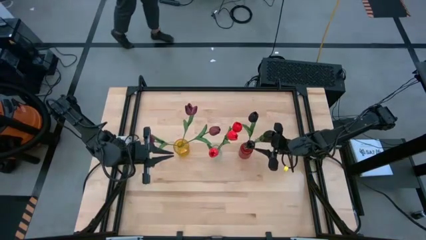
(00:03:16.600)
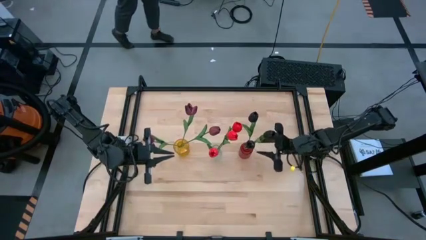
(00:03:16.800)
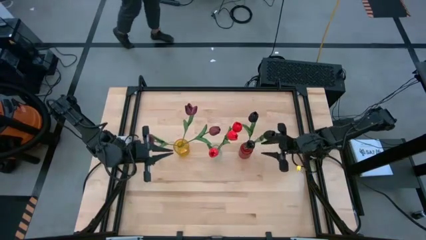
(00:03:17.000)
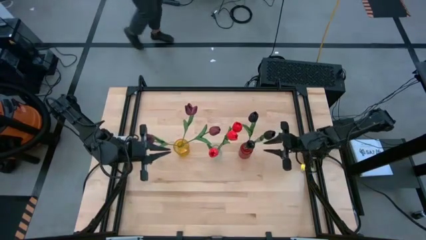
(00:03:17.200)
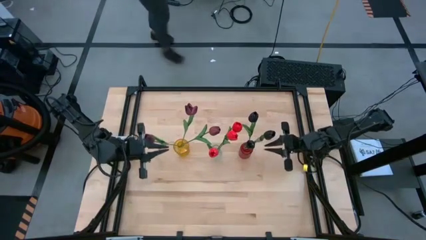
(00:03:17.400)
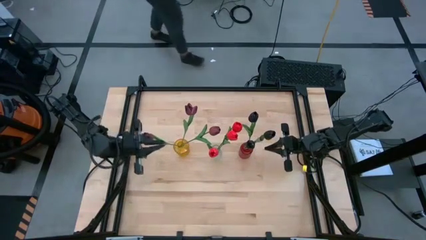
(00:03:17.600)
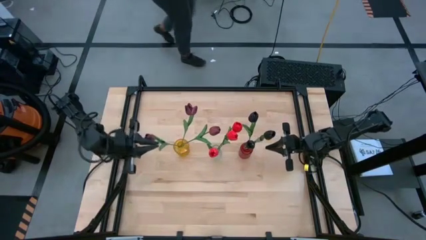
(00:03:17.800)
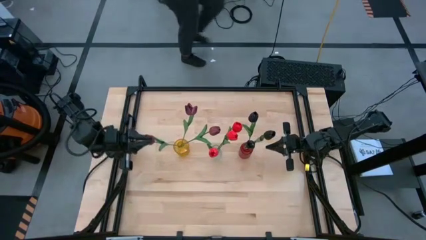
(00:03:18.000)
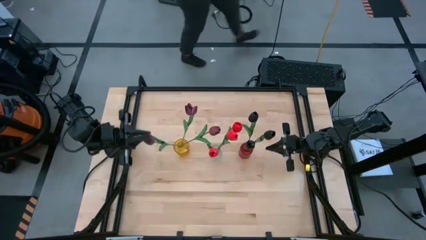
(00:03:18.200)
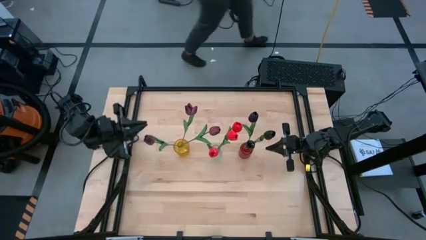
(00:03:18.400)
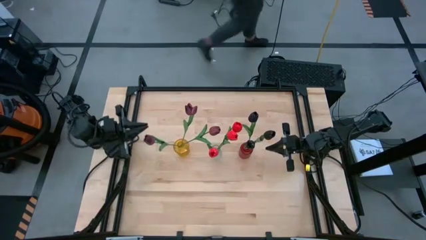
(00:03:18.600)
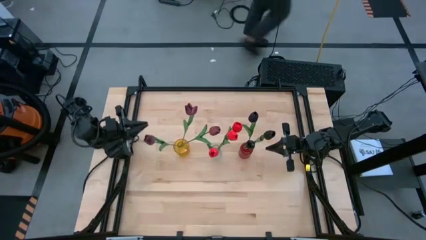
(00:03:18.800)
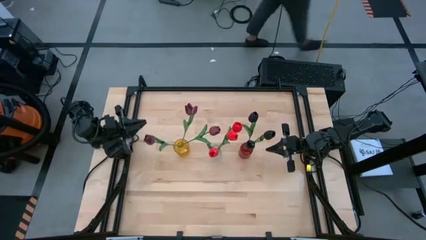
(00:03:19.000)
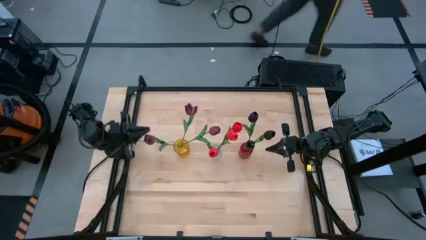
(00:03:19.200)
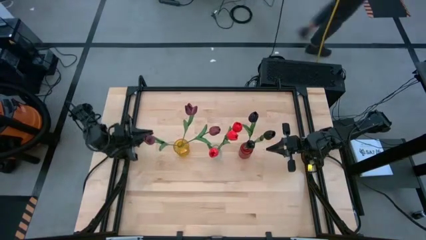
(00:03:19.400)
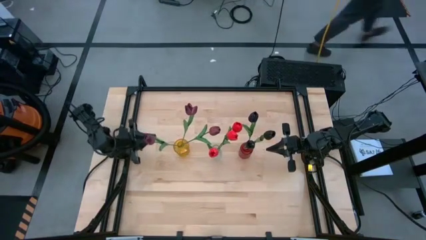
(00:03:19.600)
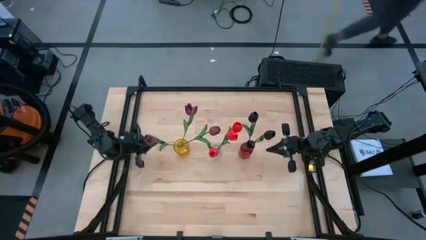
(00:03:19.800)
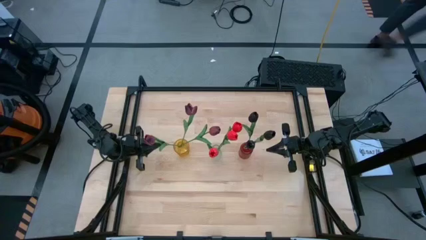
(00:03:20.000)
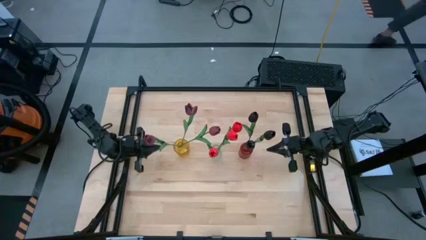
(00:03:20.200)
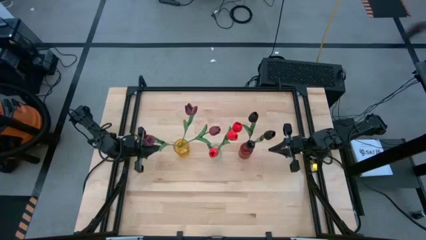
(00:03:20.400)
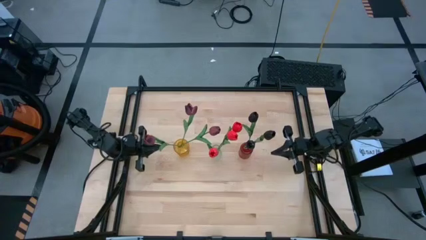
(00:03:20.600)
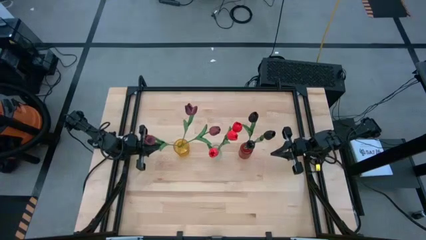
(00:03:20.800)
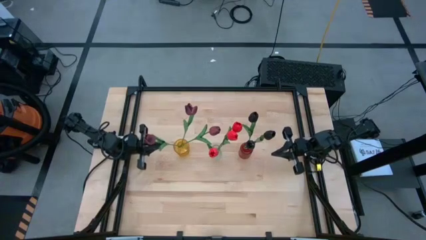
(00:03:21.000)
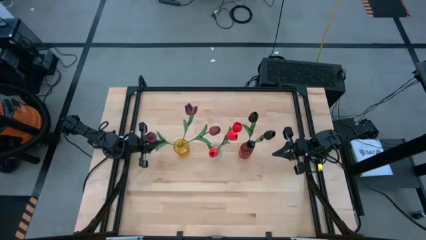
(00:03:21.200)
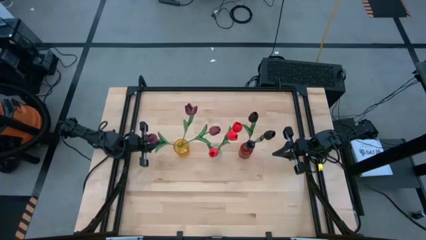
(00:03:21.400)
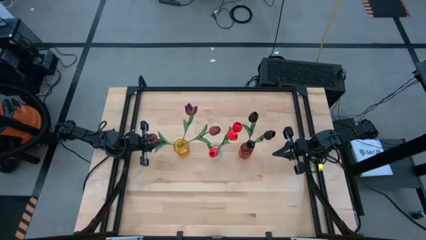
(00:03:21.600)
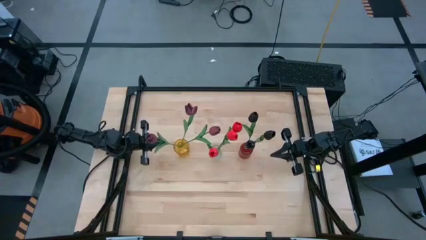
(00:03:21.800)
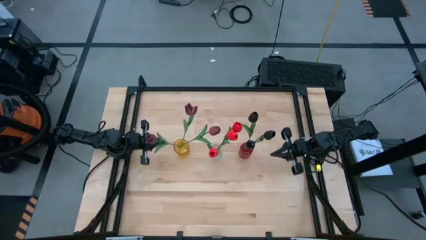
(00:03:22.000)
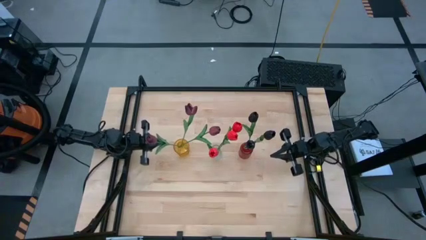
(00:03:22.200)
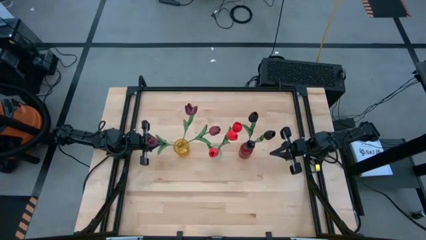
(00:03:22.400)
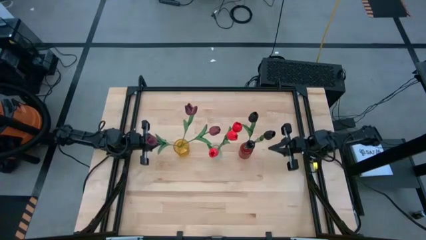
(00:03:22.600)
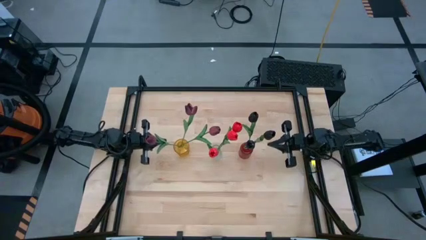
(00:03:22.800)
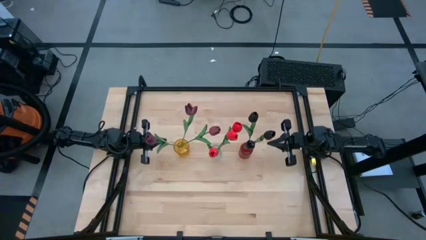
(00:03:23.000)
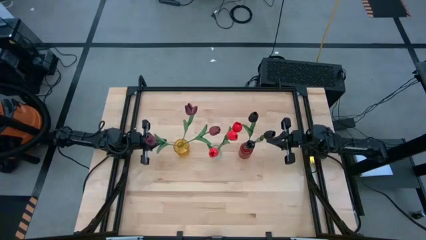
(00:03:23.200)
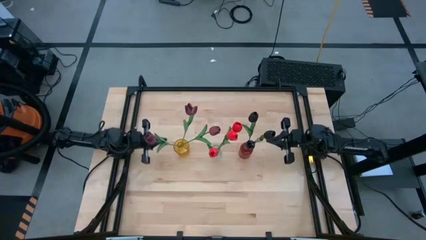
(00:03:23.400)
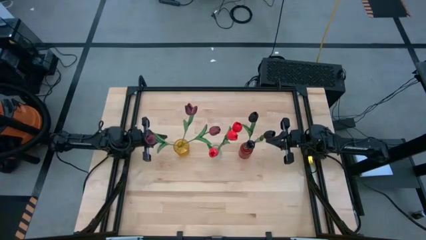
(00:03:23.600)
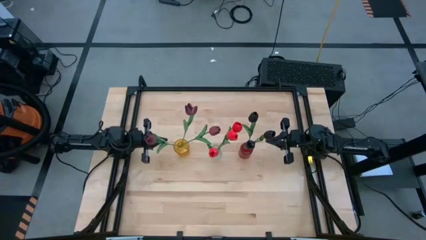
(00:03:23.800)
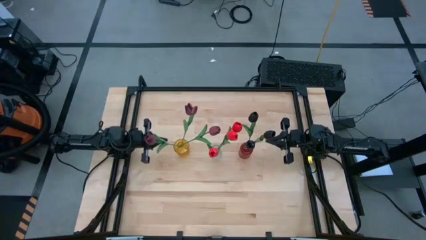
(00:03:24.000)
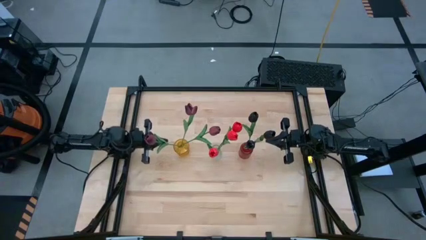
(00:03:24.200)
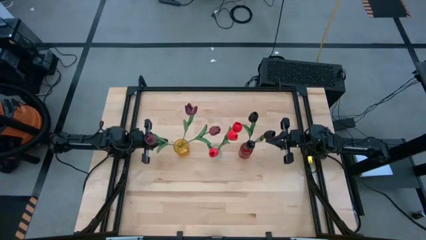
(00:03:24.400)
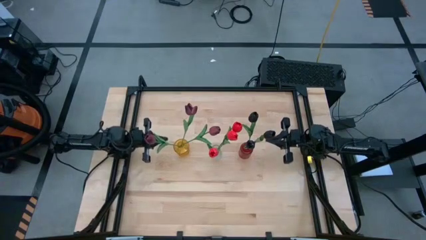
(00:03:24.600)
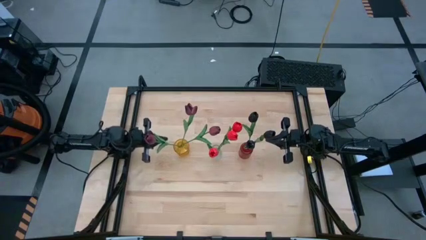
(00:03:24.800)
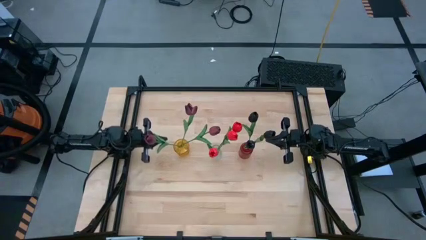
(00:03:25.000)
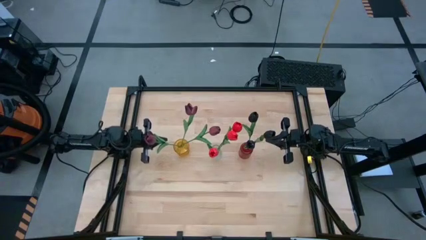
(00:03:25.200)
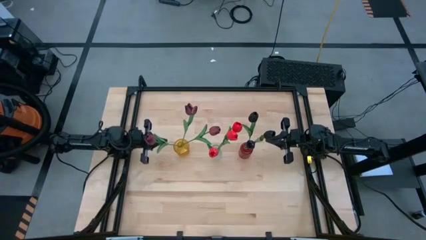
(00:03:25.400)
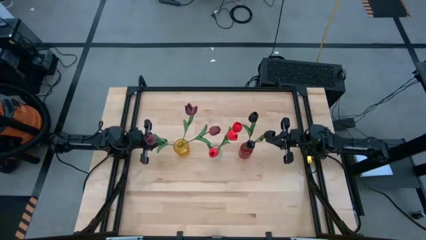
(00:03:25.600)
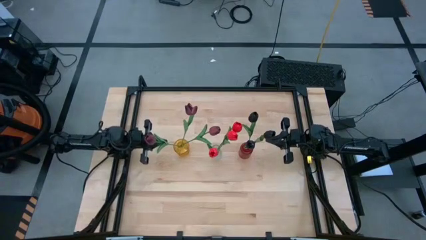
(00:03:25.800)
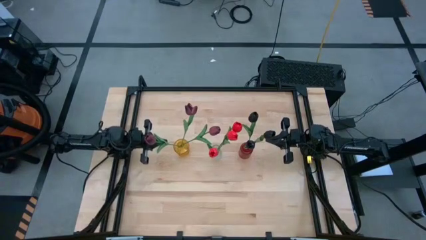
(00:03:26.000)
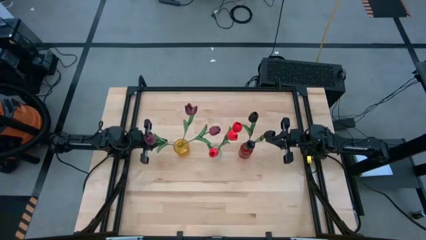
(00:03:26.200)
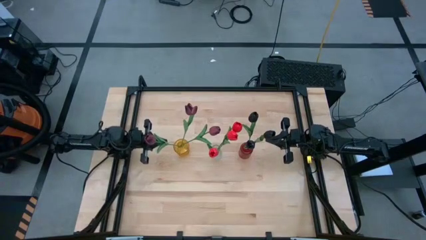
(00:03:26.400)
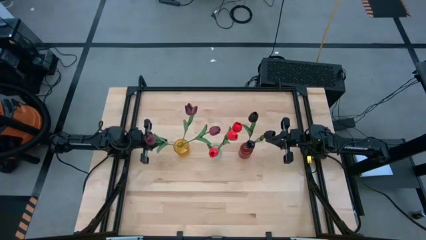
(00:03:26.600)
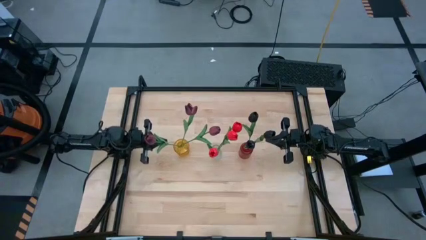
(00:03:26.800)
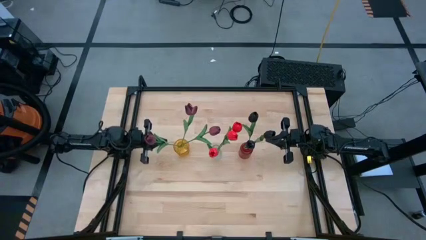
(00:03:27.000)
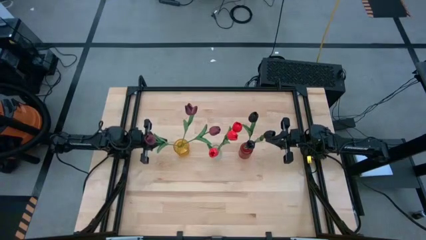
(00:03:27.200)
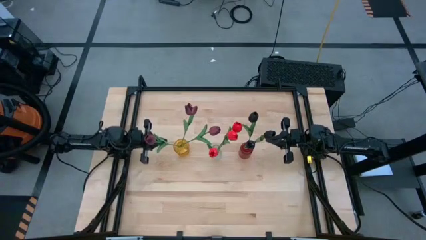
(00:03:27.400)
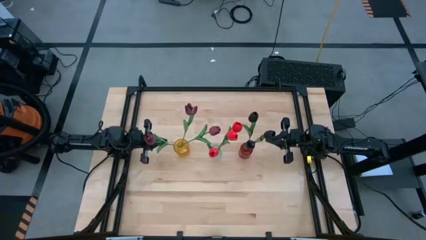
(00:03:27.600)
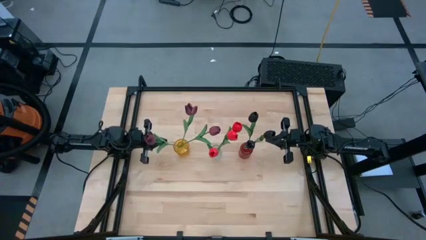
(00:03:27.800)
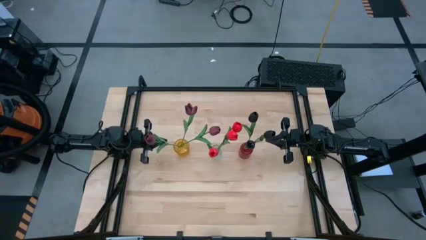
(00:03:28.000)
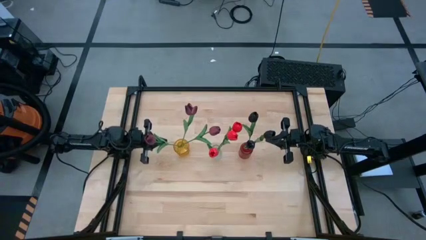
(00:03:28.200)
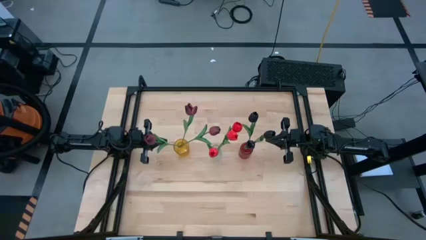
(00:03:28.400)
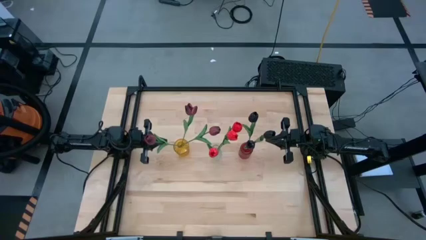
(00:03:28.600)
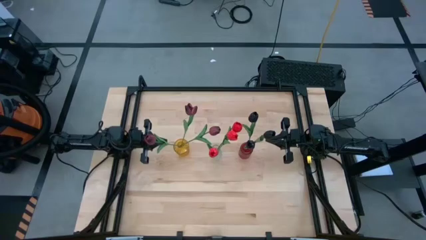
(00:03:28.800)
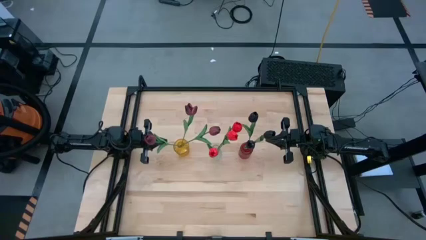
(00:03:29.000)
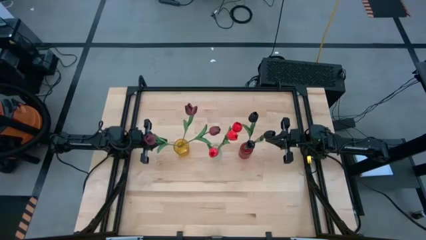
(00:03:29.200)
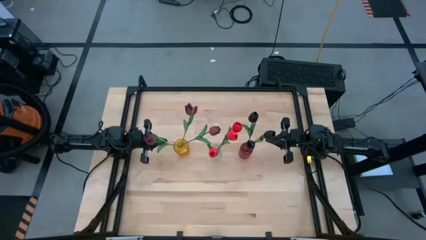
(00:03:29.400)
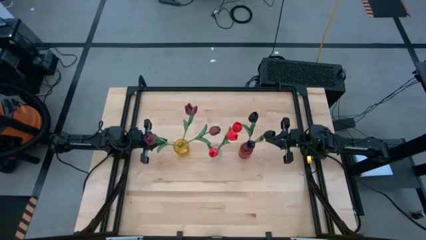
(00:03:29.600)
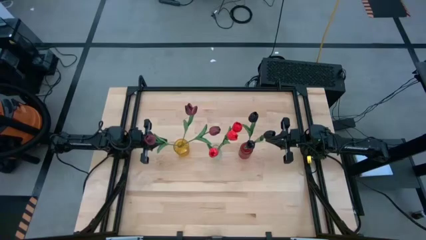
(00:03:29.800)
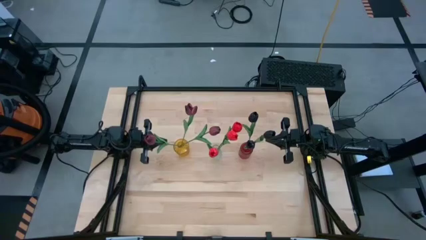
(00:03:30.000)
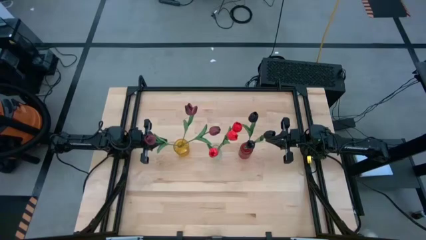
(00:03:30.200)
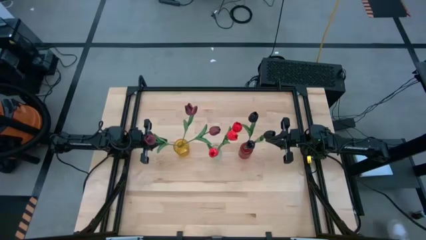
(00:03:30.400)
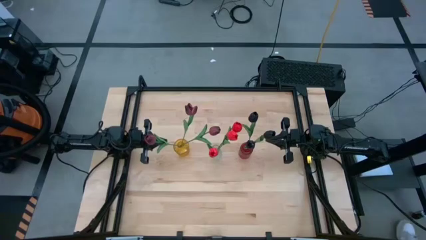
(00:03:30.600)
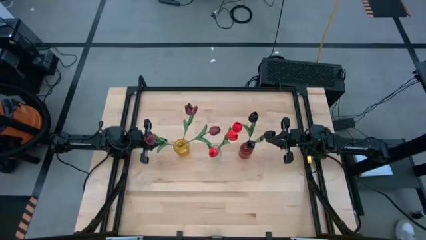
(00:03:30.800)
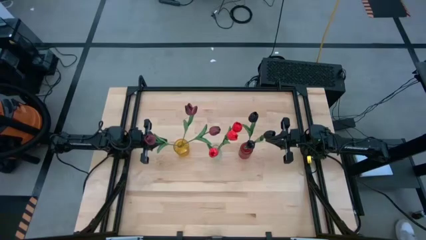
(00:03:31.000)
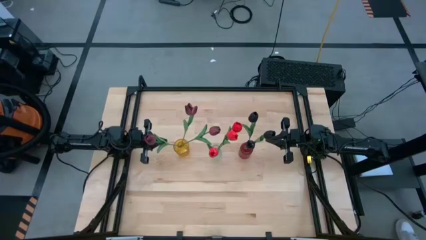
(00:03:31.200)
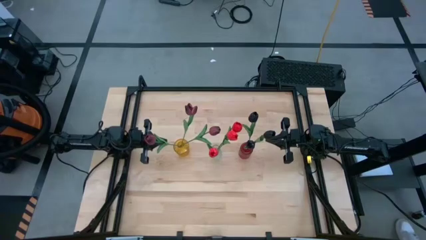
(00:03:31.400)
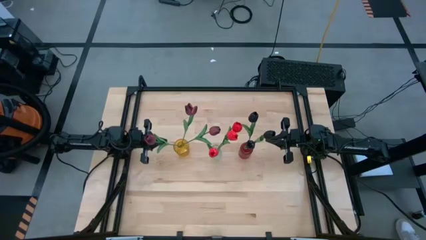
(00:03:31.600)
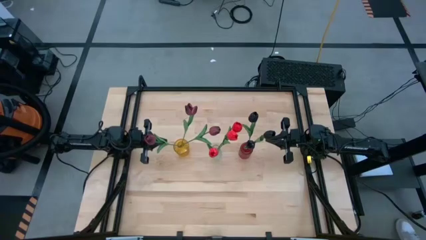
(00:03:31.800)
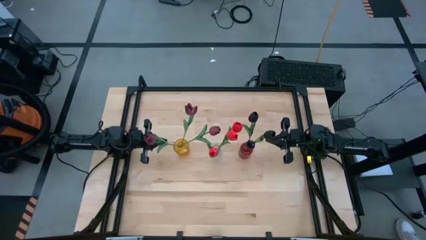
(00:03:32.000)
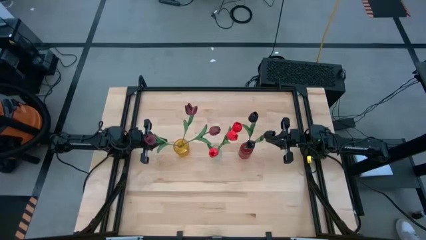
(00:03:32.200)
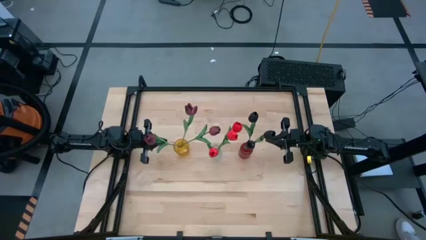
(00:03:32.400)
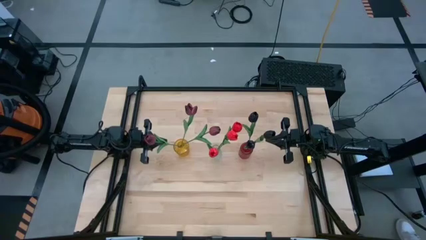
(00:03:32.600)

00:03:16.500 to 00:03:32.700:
Task: Sort flowers into vase by color
Return to Home Position
